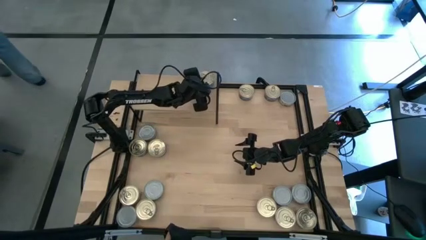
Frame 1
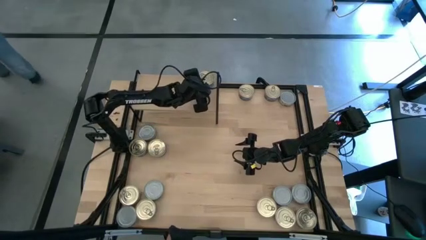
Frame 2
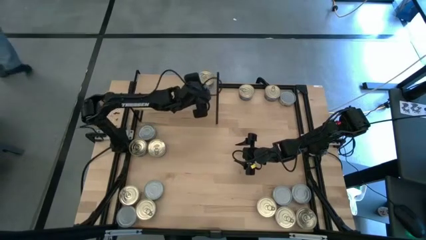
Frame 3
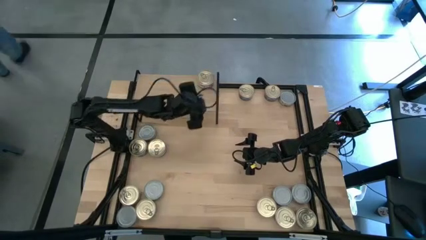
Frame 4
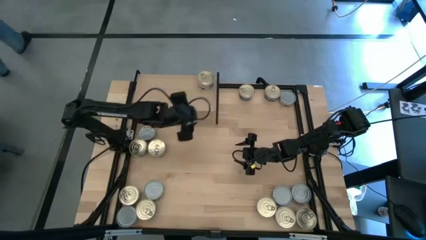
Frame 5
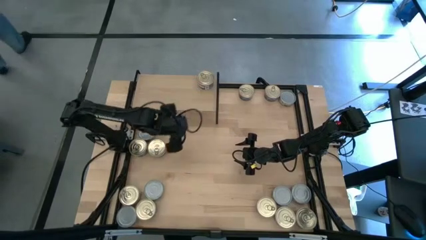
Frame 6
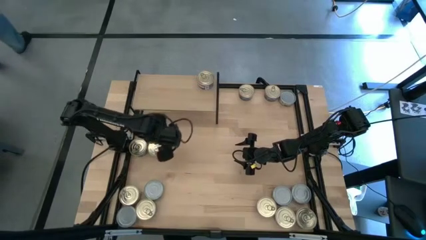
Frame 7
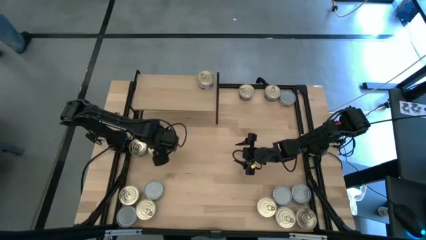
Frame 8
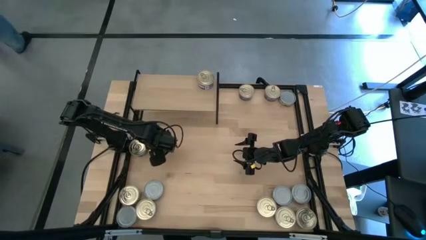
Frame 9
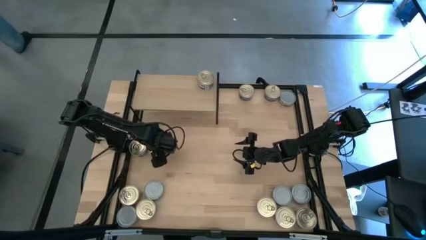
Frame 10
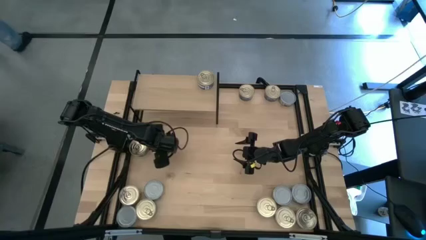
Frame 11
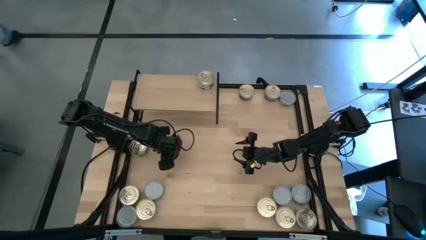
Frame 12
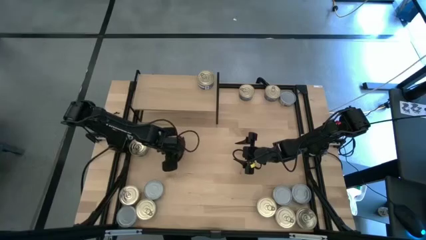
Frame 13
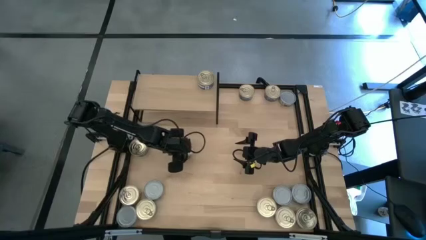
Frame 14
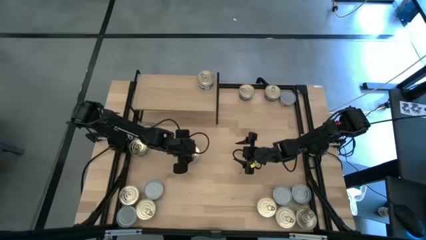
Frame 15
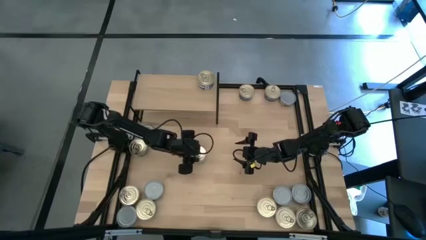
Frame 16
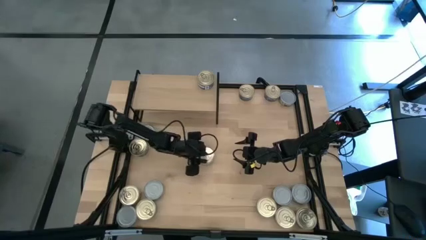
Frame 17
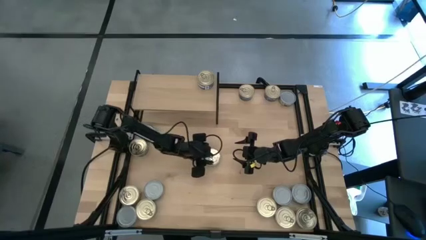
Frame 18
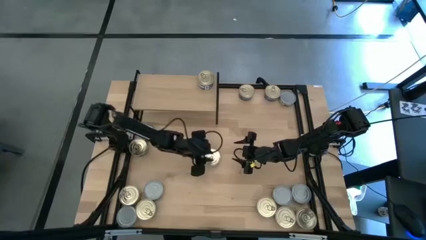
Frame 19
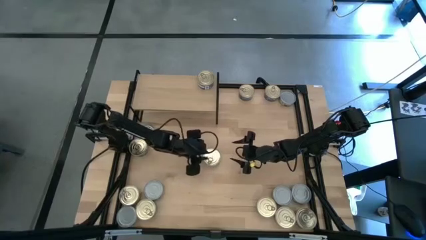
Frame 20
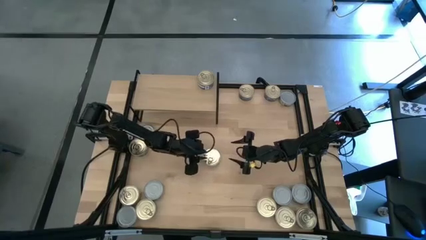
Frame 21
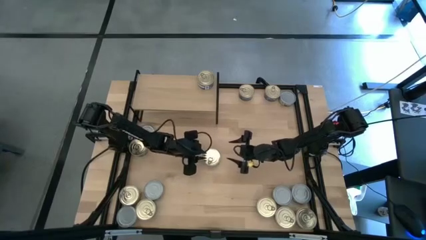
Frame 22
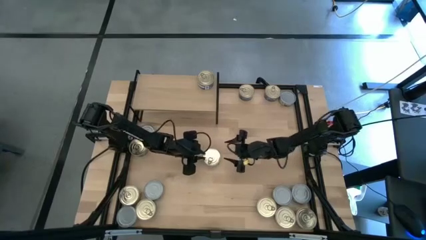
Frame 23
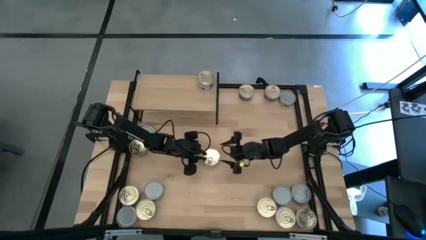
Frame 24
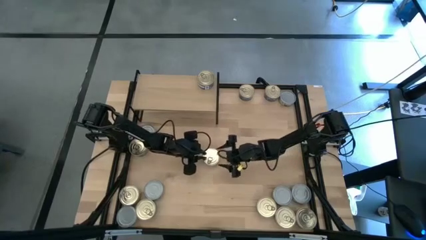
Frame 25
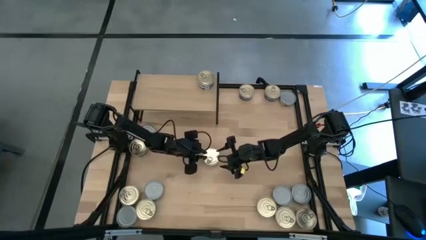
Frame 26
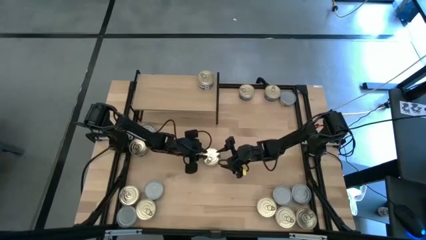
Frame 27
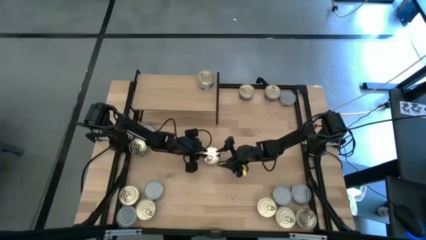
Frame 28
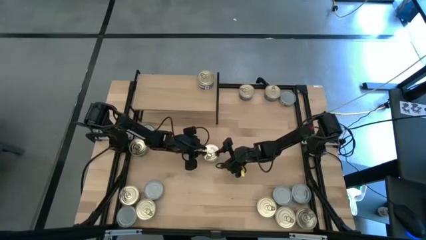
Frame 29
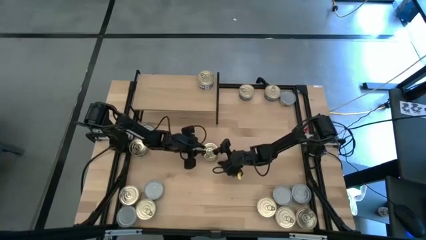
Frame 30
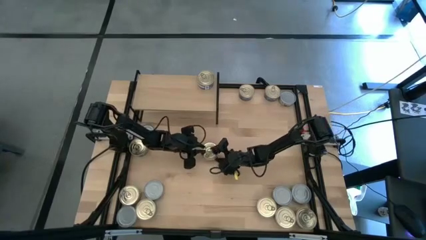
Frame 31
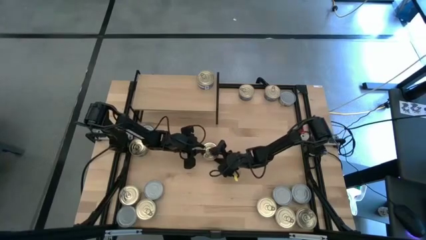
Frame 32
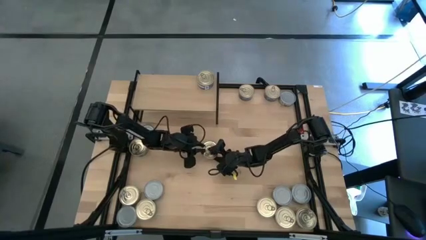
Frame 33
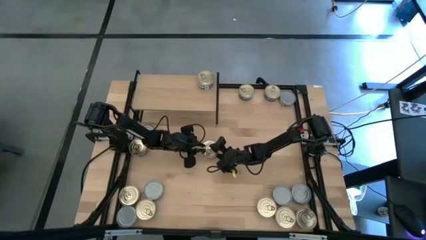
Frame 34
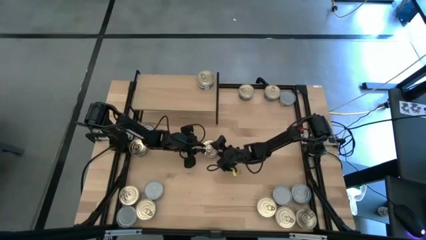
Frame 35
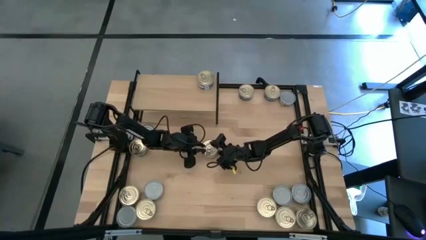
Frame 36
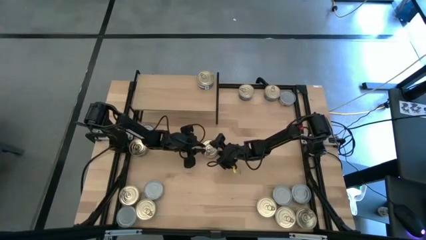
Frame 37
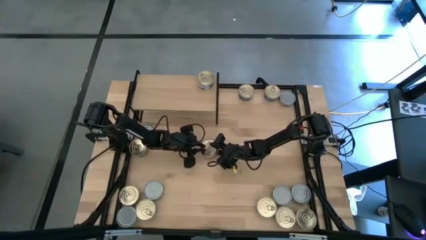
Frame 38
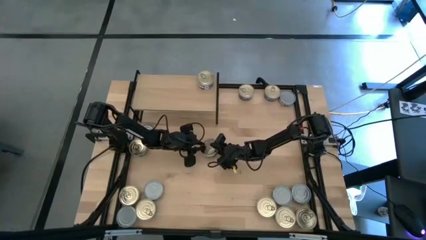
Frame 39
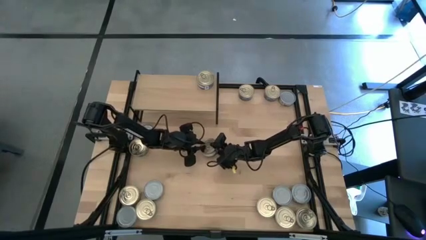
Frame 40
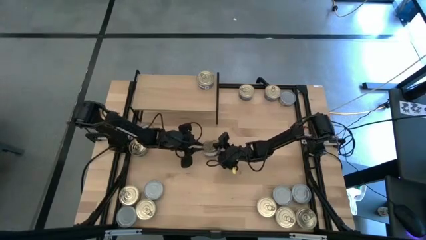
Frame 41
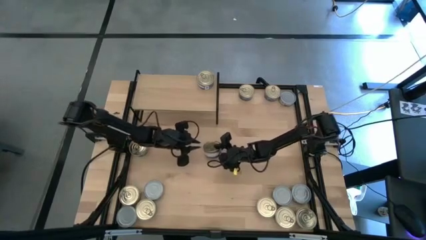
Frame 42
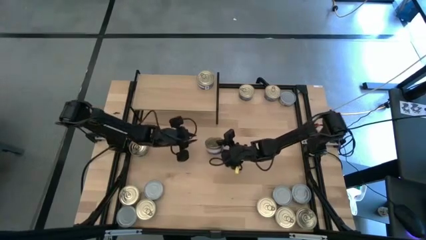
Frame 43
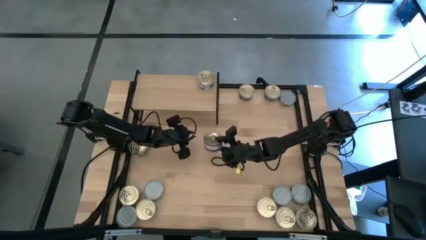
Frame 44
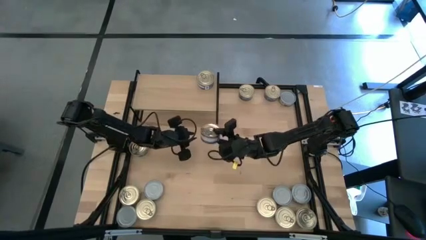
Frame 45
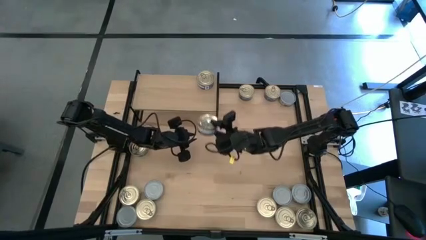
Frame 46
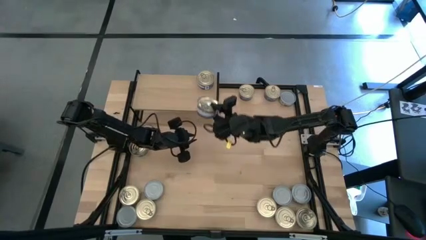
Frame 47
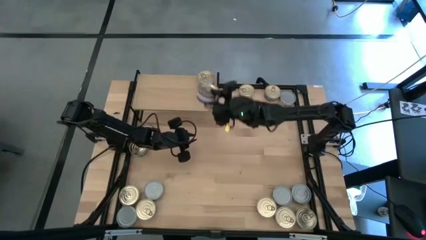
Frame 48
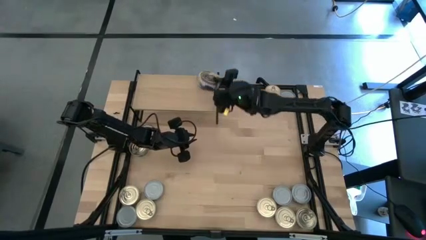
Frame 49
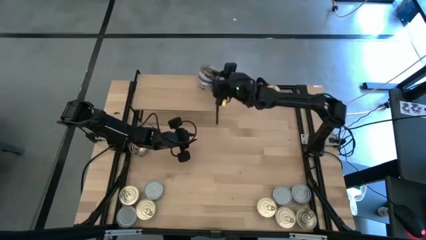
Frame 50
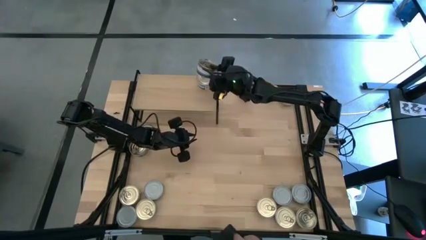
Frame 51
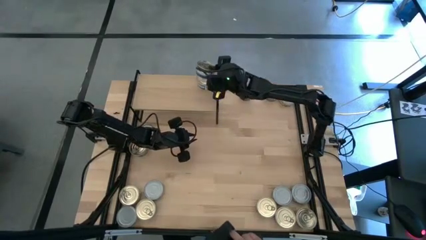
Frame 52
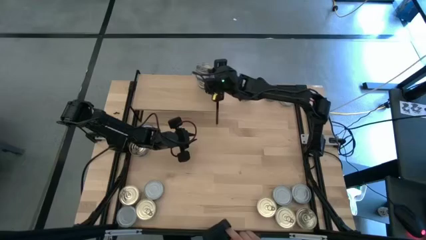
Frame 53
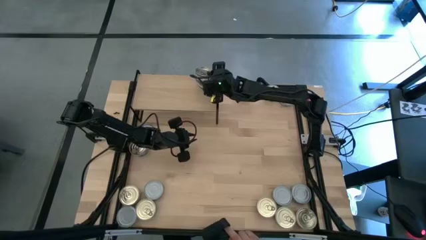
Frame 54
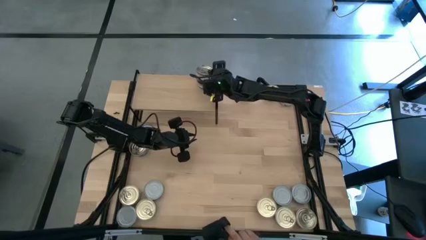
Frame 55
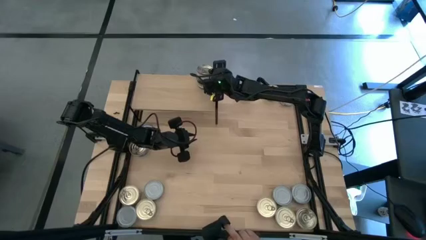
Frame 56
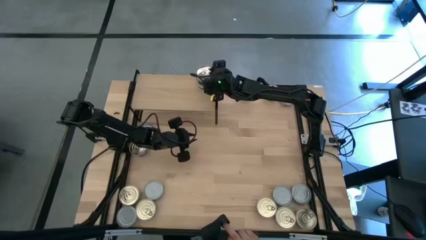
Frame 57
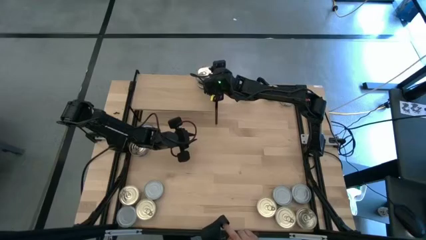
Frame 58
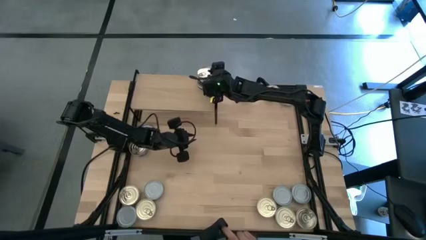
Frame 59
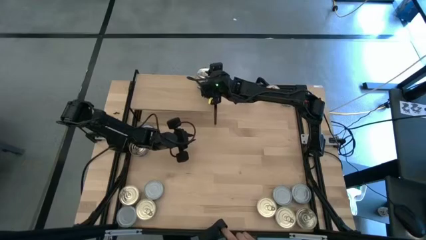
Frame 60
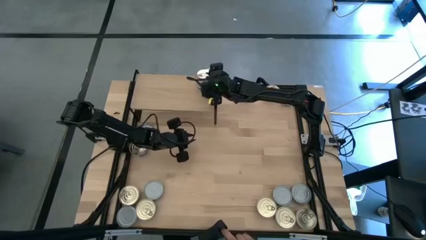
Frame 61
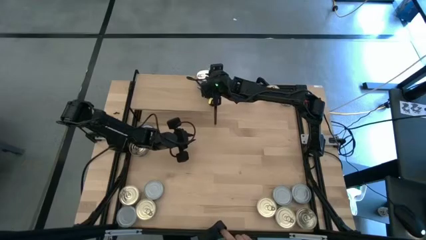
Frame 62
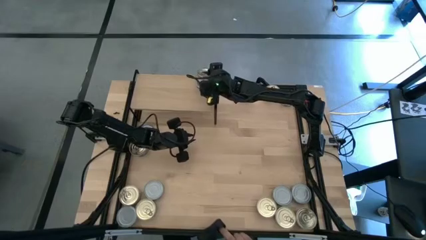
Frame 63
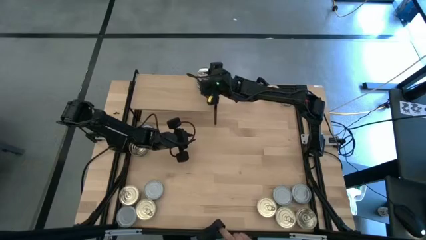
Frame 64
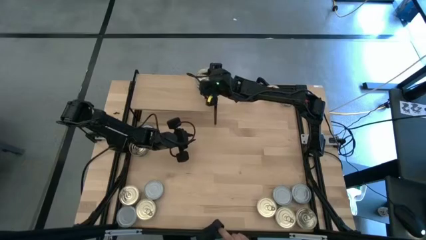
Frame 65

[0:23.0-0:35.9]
Task: Stack canned seafood by type on shelf
Stack the blue tuna can on top of the blue tuna can on the shelf
